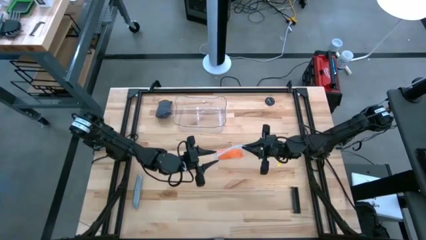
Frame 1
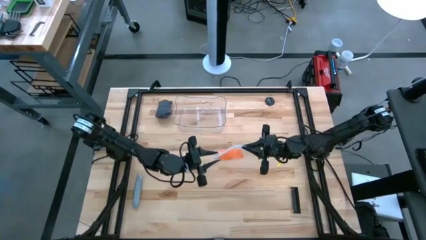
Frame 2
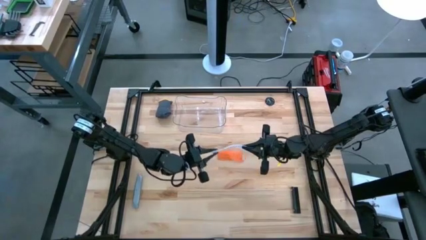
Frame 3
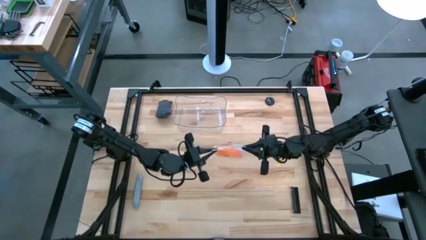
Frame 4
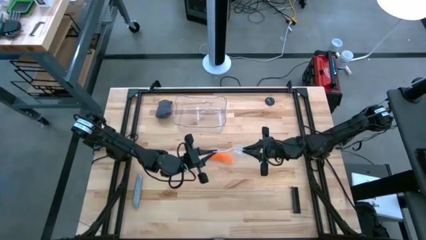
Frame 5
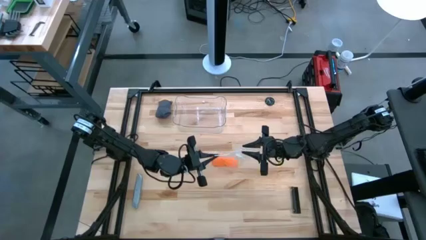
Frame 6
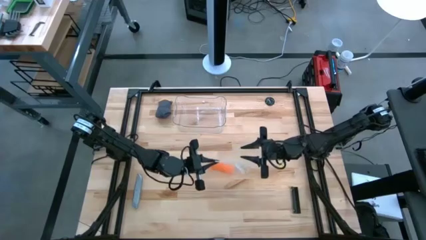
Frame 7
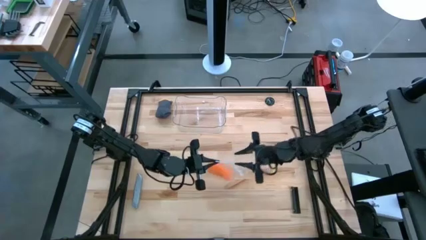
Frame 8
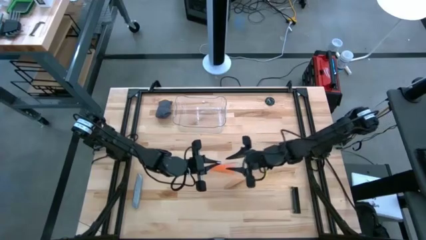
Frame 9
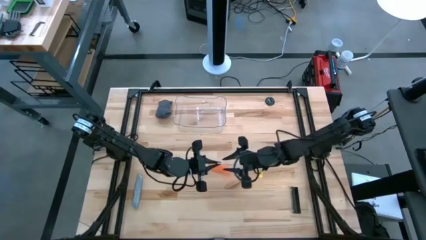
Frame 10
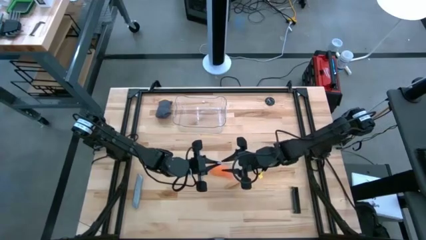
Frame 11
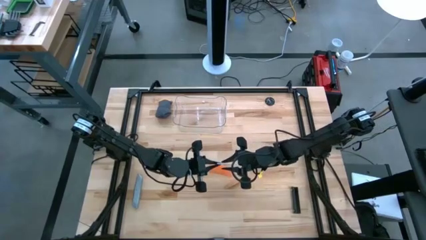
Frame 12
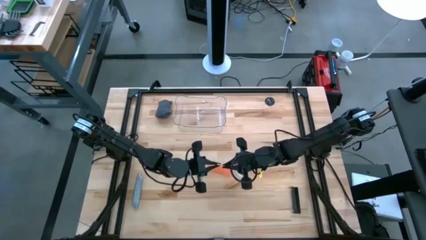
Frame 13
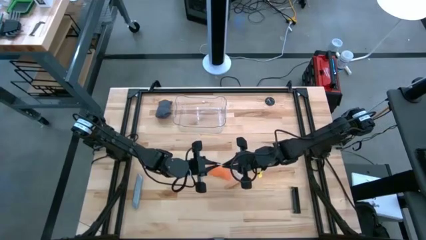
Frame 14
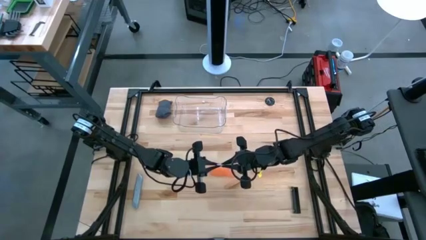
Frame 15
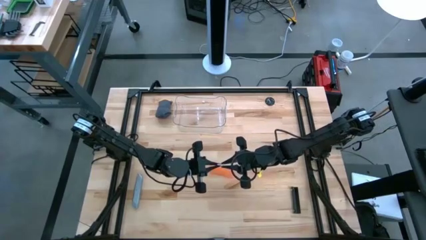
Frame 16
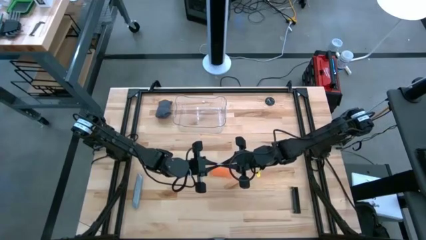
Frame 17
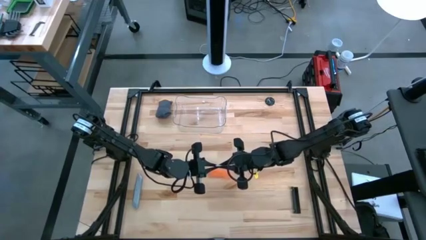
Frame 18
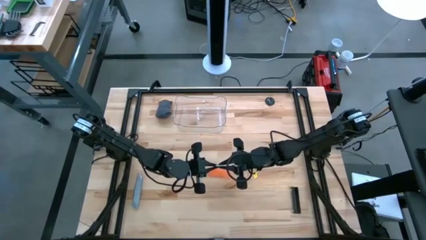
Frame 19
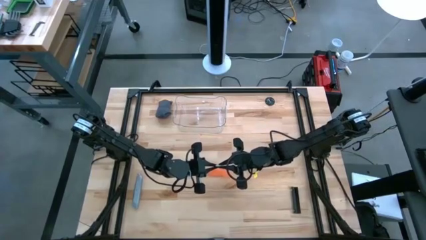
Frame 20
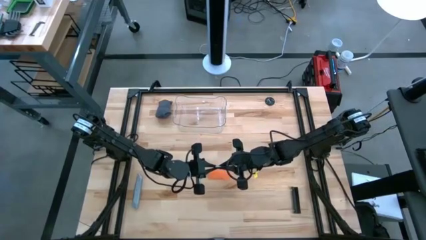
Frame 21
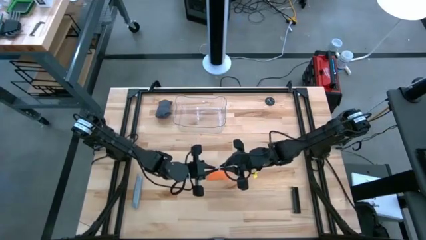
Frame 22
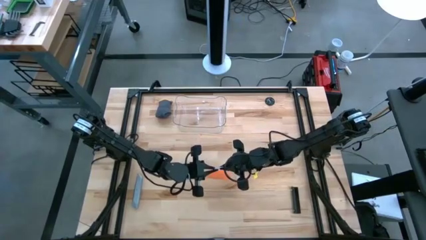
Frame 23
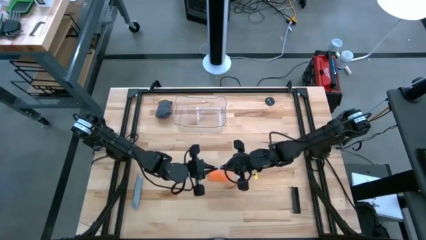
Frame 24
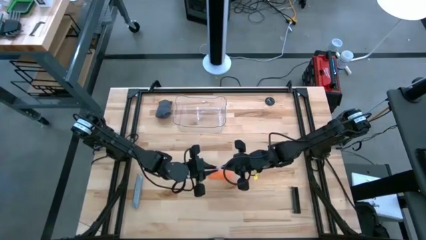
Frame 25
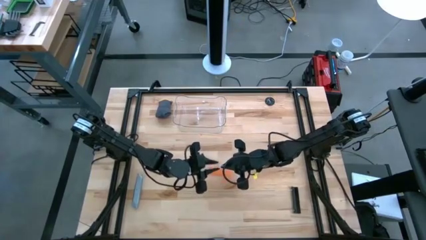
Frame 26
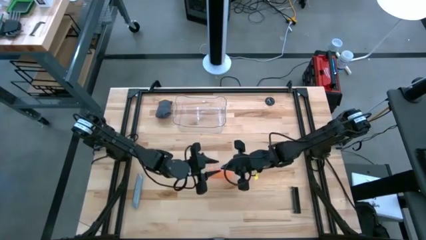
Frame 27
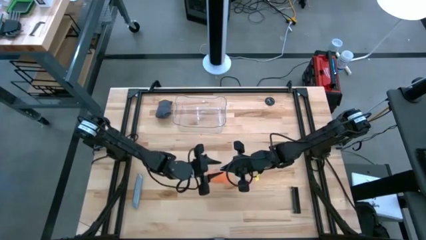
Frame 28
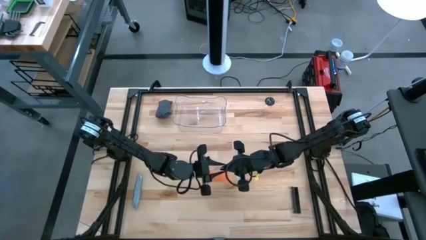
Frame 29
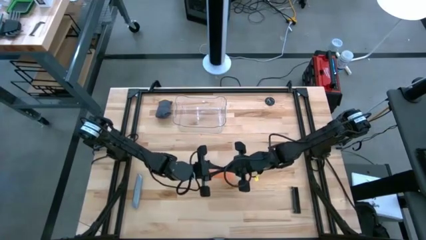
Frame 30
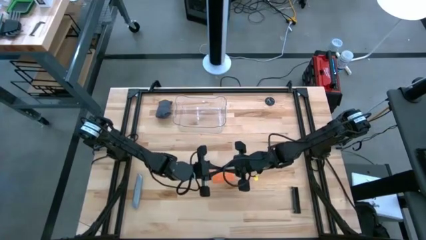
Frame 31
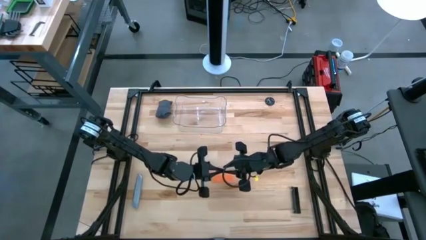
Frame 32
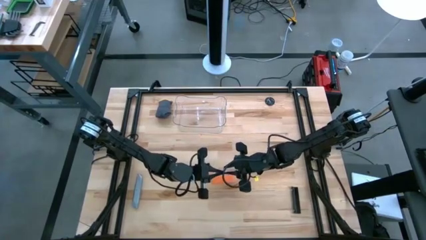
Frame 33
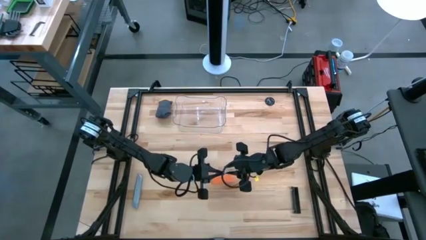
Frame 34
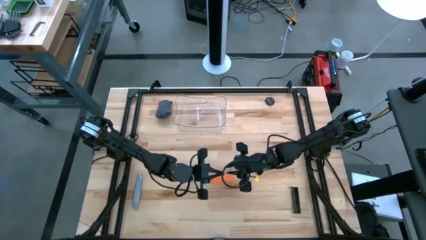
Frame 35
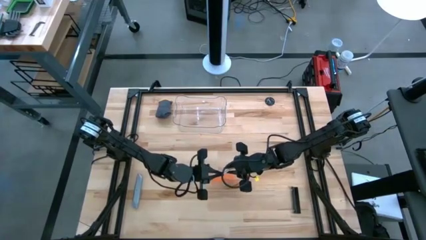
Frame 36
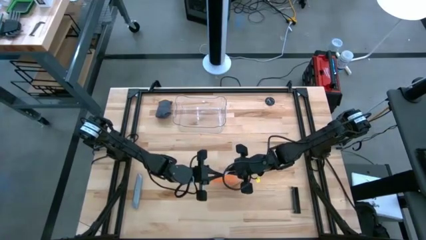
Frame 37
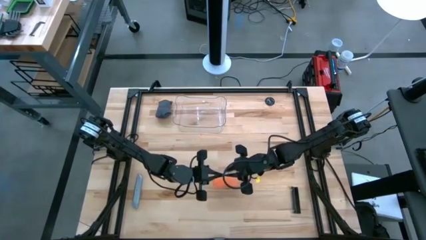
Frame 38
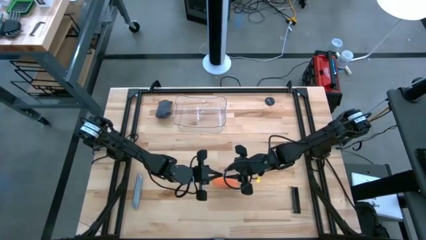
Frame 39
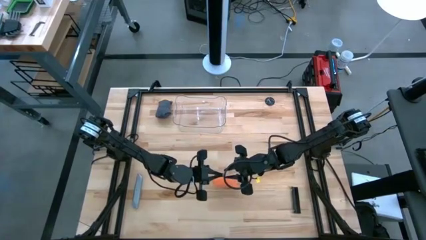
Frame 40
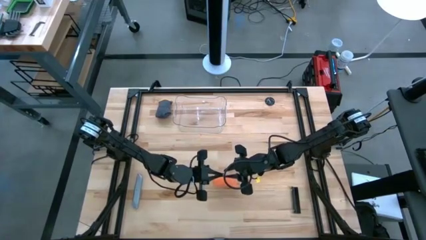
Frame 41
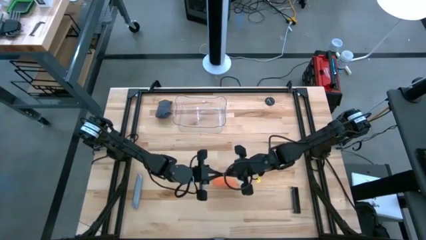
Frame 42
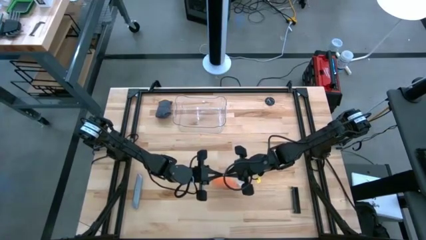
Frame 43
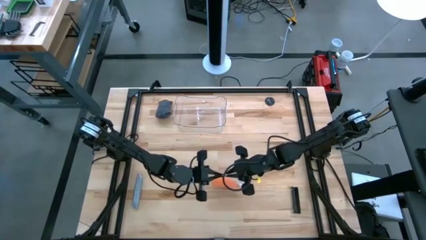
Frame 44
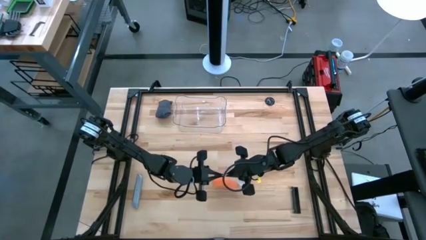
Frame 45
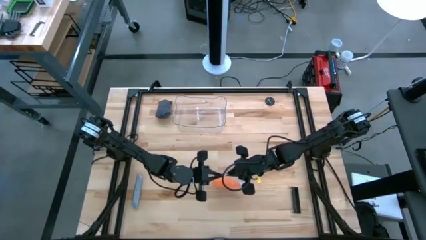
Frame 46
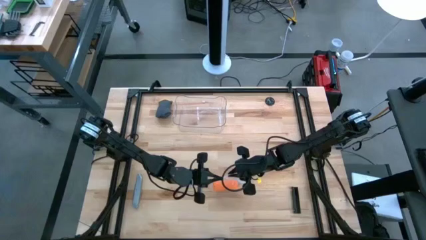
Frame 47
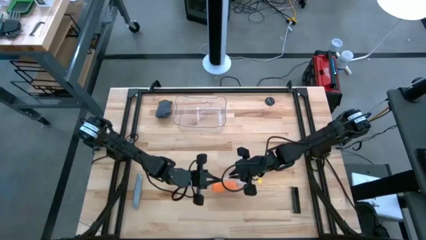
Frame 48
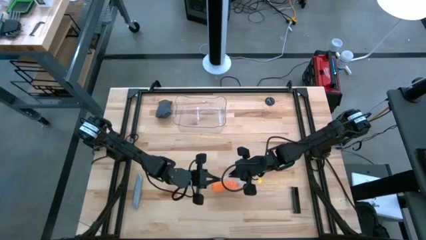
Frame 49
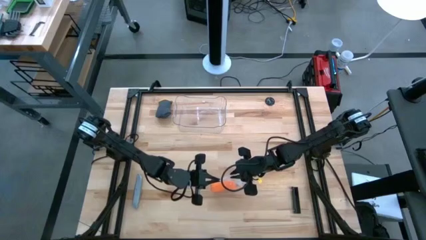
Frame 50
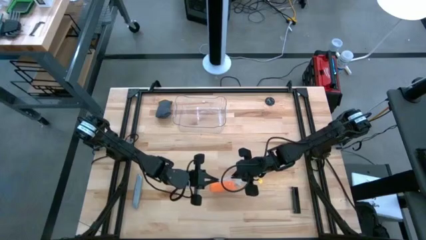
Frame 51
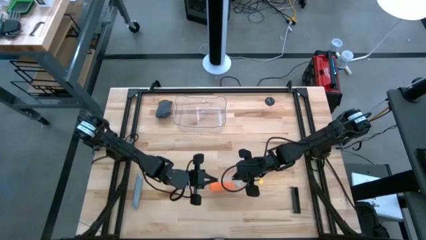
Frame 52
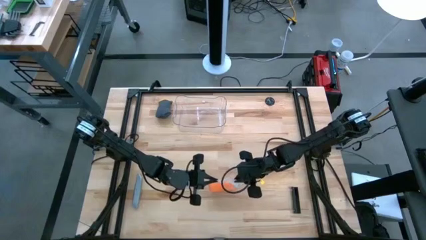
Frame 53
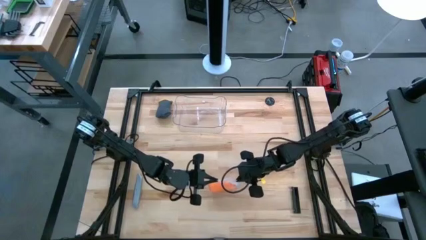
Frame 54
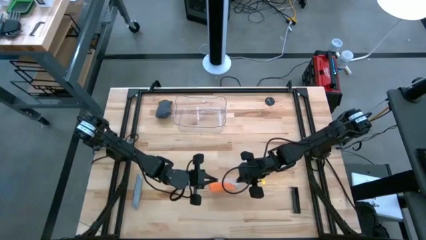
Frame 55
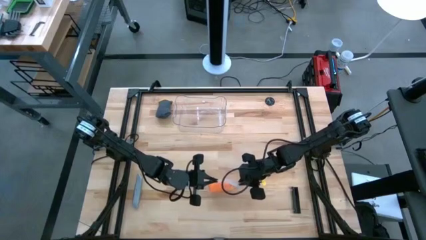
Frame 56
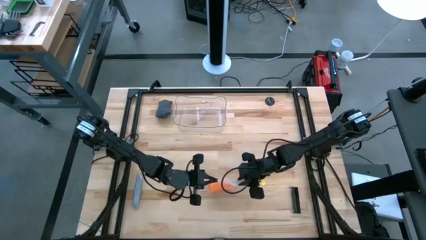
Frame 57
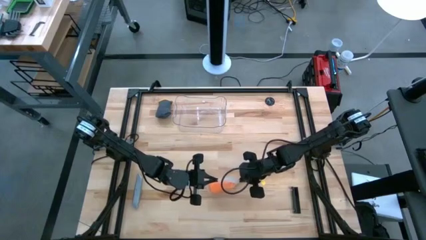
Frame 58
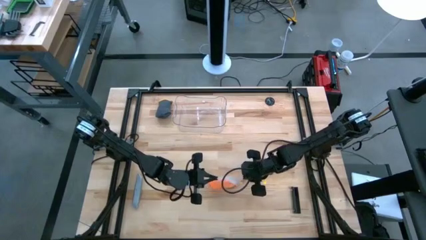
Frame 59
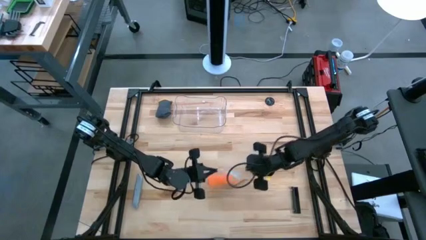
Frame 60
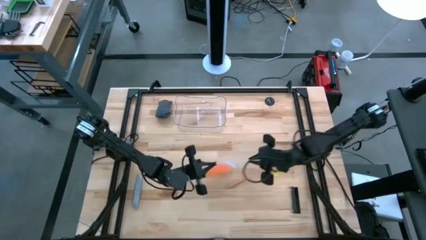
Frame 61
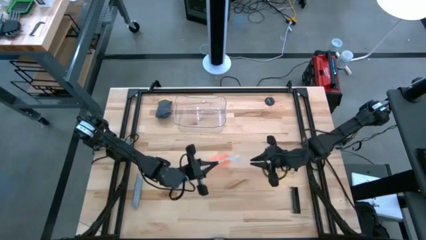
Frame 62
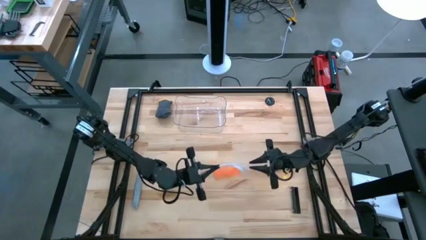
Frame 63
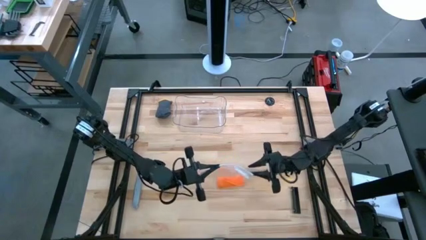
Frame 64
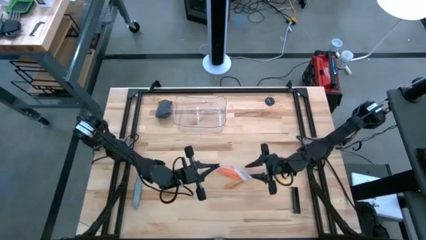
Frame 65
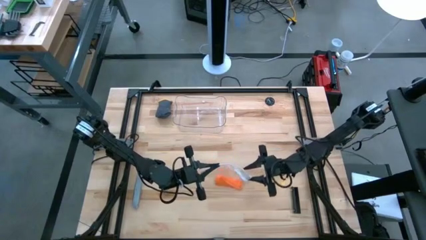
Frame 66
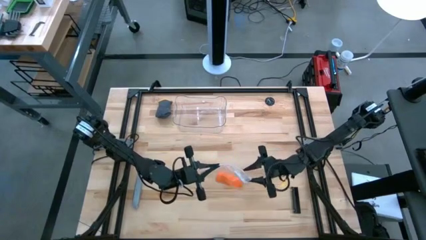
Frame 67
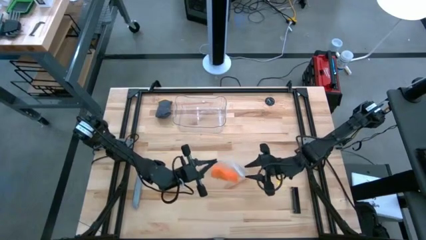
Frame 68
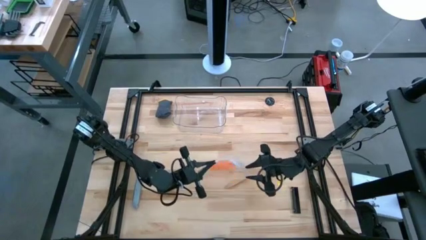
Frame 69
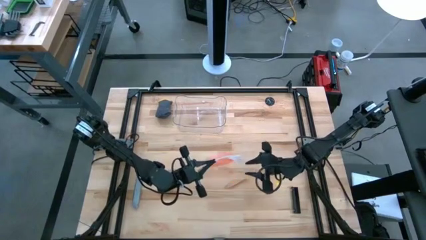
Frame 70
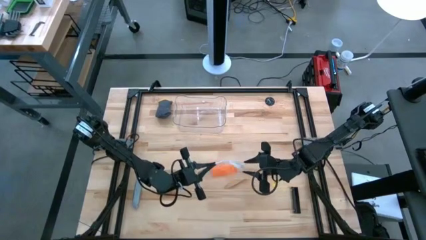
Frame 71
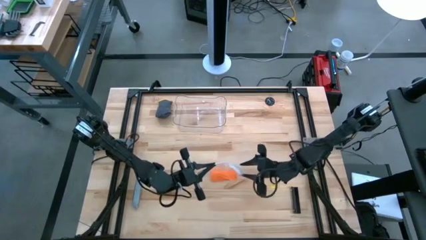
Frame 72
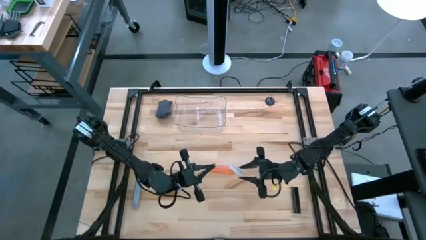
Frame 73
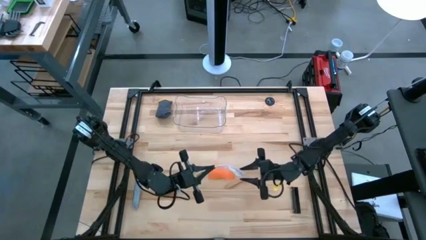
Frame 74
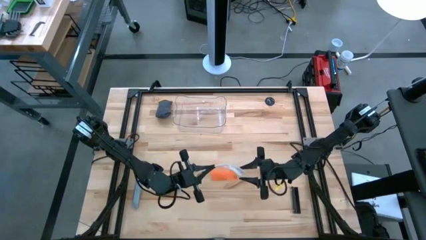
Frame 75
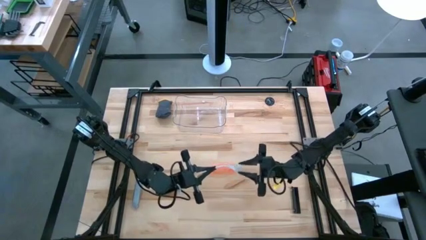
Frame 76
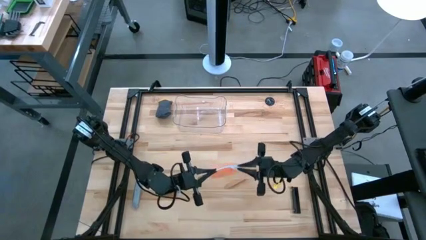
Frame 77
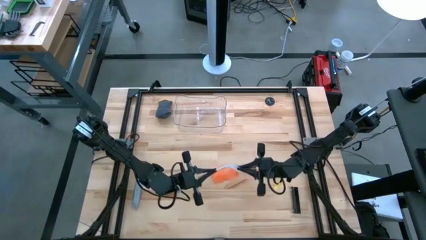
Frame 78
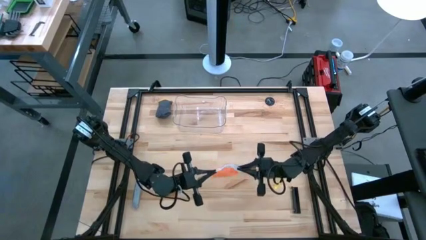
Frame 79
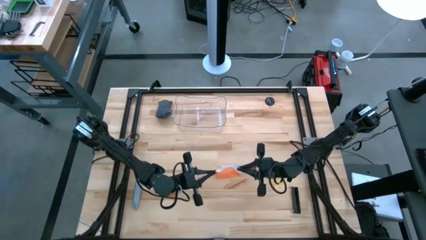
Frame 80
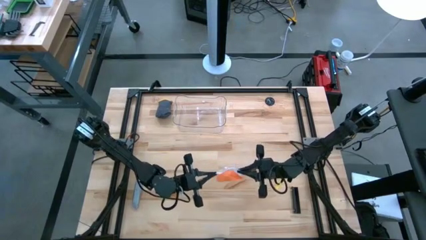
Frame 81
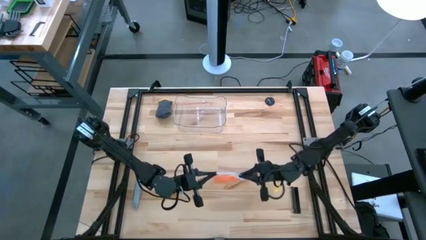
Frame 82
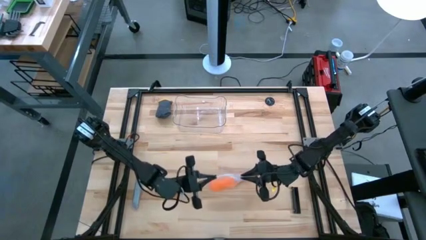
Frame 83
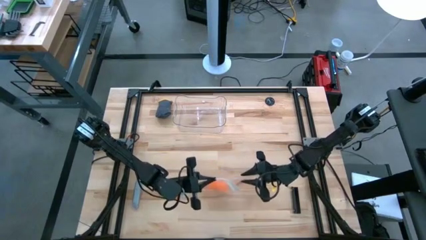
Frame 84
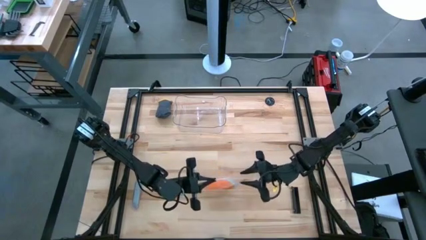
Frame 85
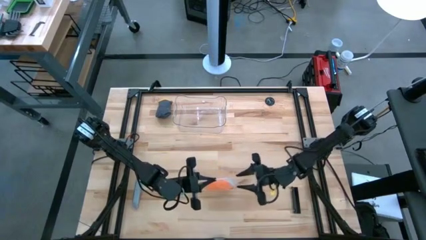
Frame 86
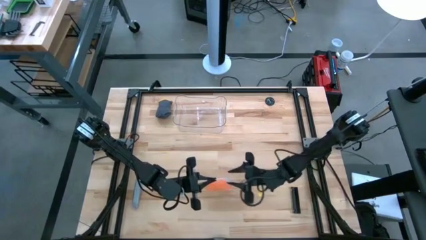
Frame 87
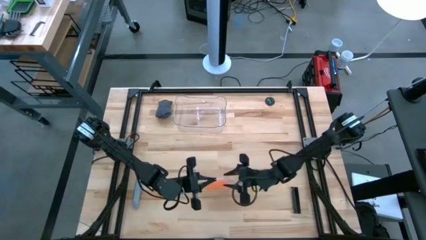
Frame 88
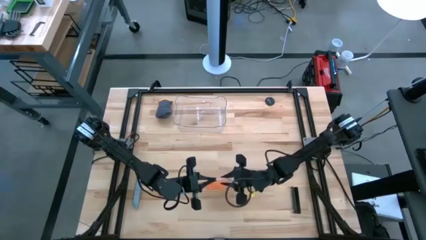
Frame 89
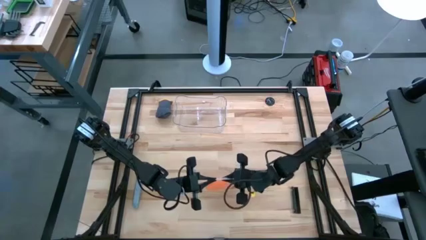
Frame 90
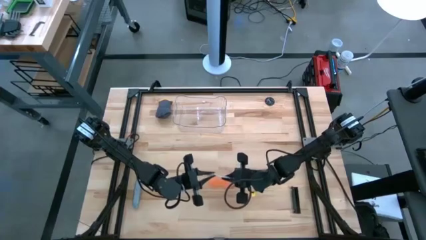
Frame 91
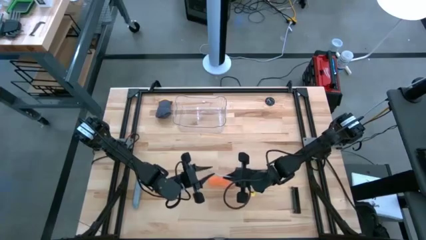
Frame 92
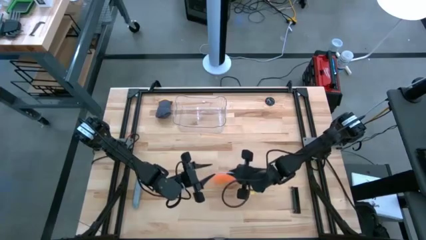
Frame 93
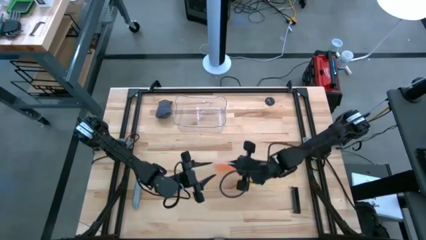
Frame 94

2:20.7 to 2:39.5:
Task: Roll bandage
Put the zip bag into the transparent bin
